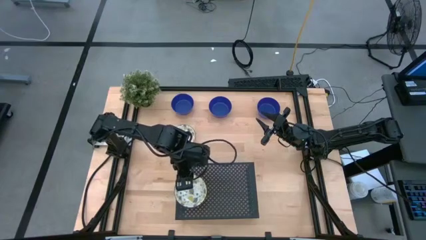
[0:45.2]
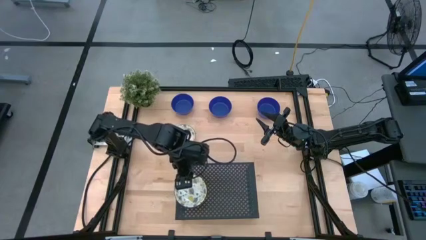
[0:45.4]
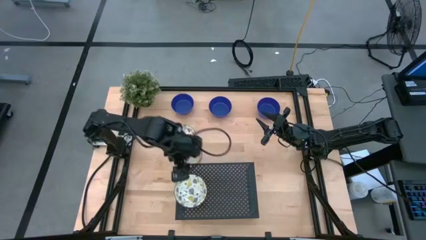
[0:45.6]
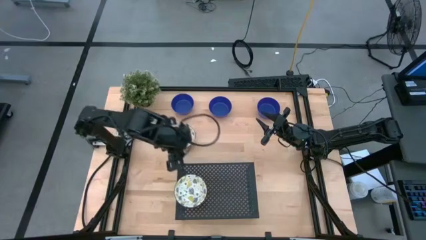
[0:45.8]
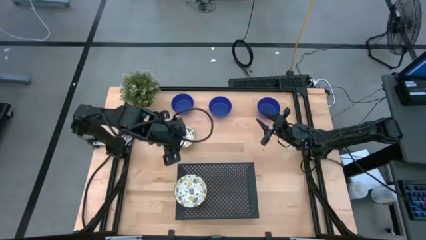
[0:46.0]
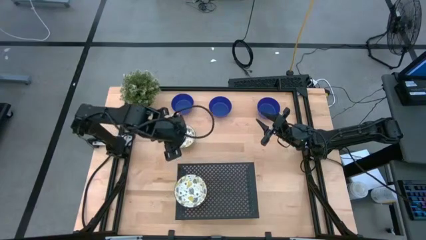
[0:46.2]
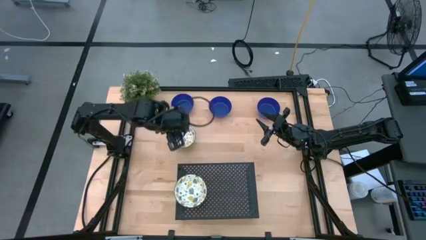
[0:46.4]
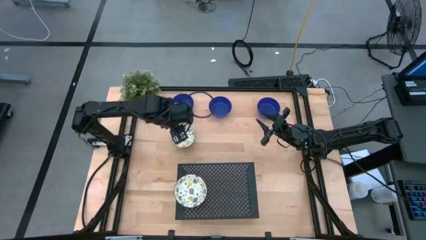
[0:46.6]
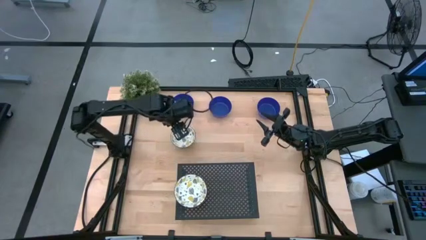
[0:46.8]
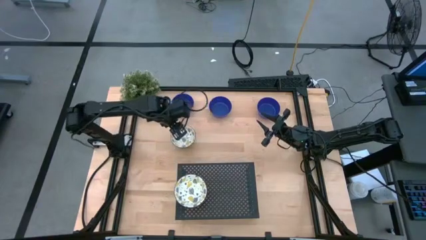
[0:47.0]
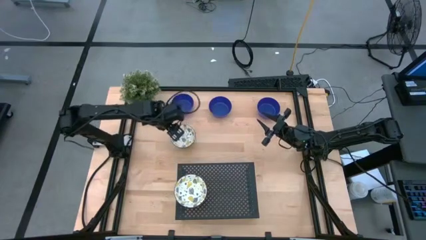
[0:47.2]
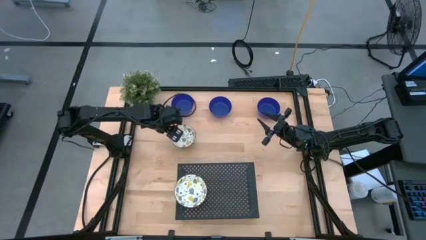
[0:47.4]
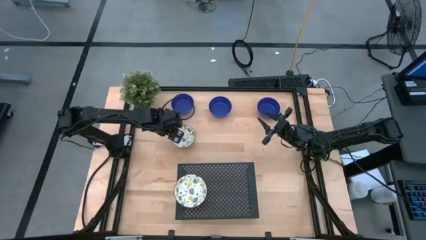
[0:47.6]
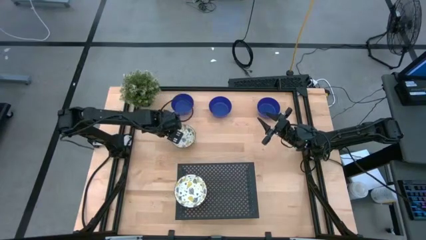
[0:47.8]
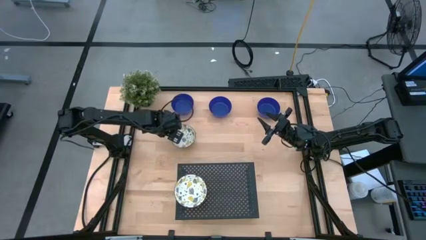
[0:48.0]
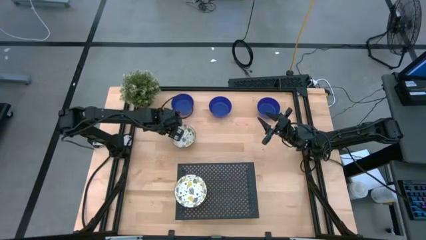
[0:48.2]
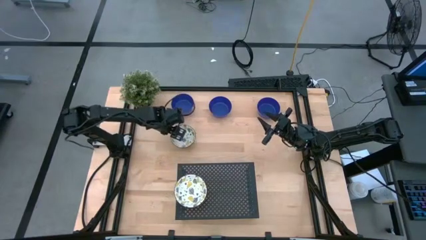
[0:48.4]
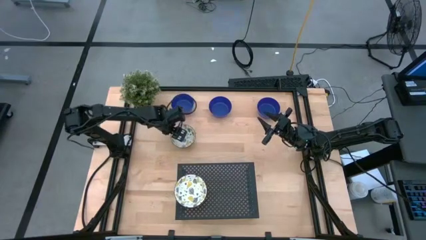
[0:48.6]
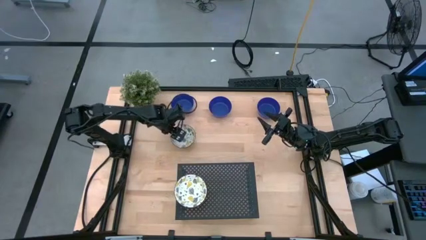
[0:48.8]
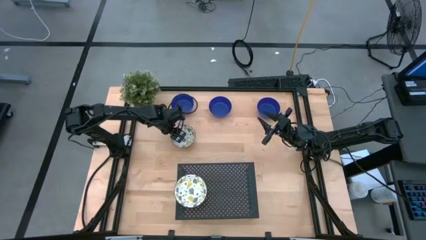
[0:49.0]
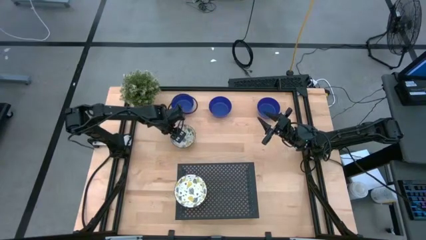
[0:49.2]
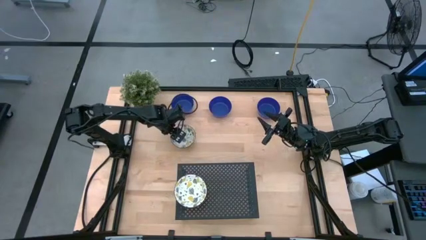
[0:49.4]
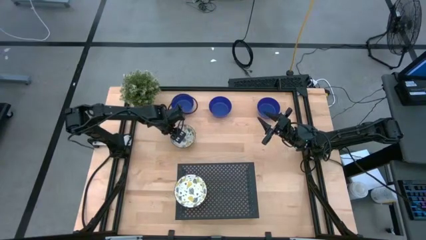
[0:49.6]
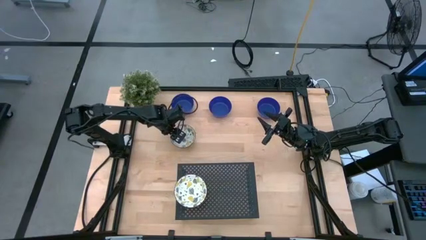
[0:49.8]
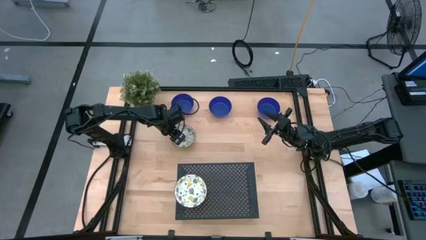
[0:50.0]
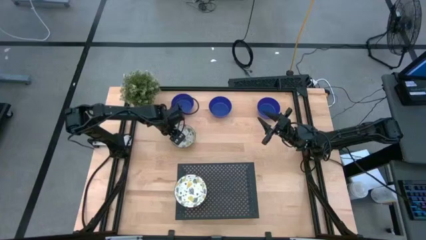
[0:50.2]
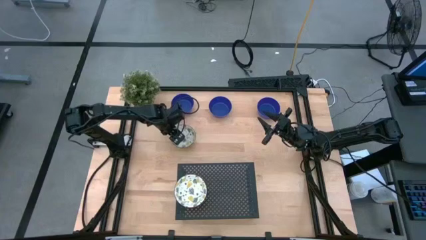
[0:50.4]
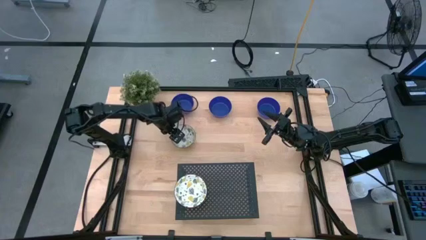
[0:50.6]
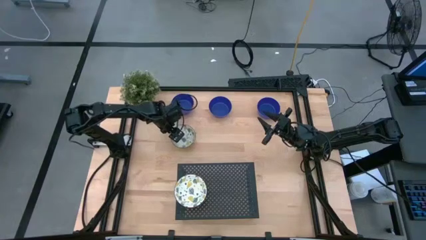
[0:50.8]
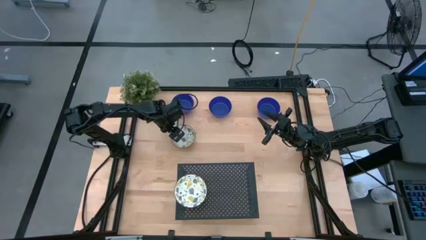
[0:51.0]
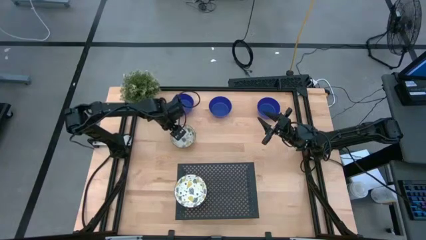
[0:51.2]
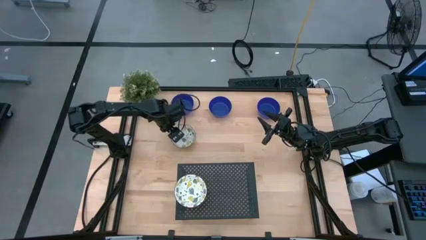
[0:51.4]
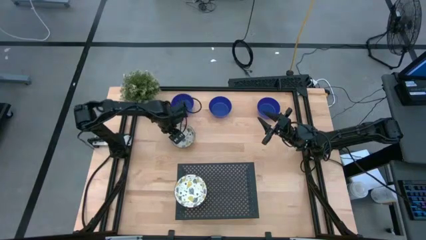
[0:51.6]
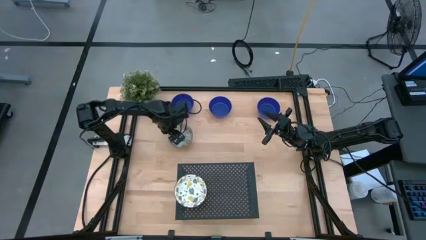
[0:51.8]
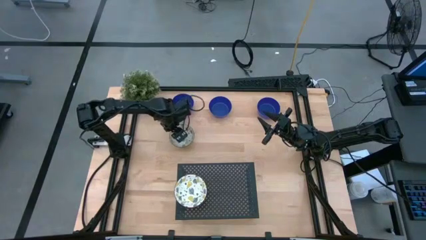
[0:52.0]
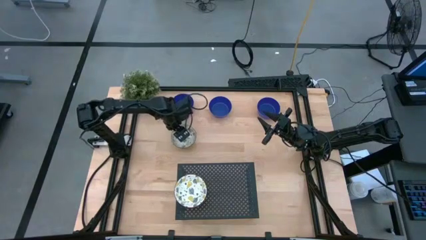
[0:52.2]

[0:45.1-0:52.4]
Task: Pick & Place Mini bowls
Stack the patterned yellow bowl on the patterned yellow bowl on the shelf

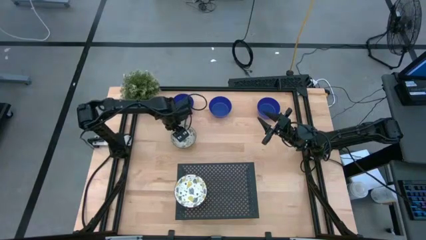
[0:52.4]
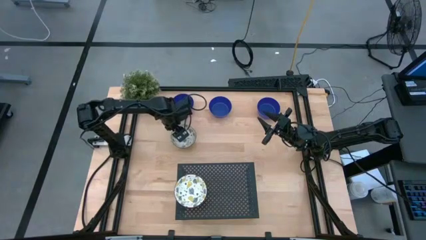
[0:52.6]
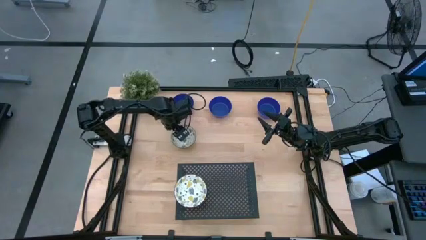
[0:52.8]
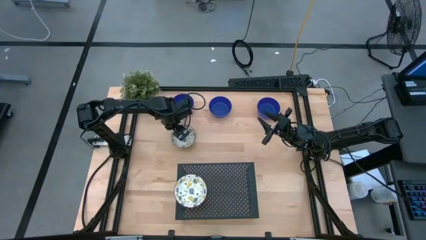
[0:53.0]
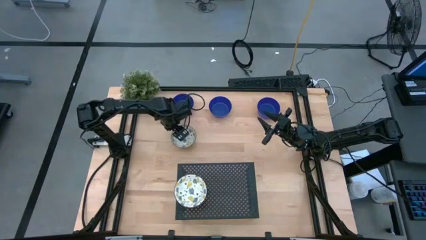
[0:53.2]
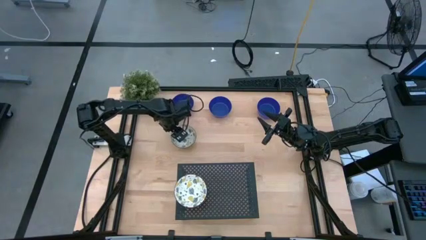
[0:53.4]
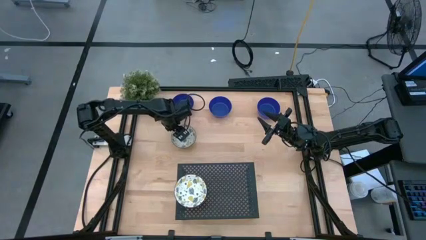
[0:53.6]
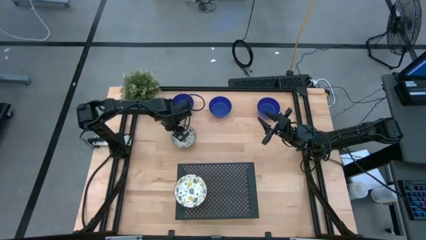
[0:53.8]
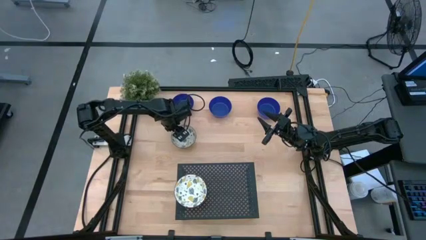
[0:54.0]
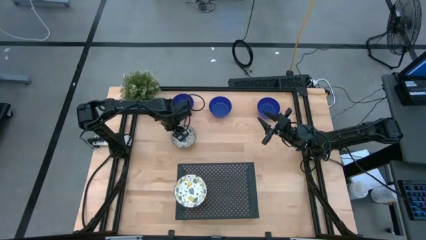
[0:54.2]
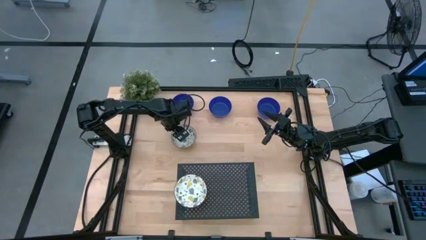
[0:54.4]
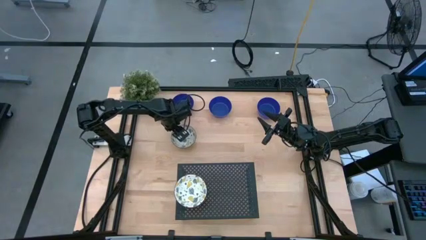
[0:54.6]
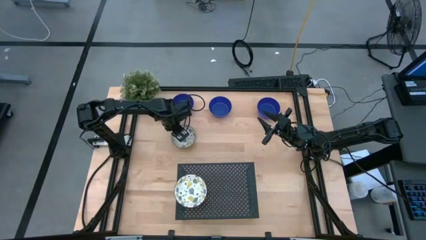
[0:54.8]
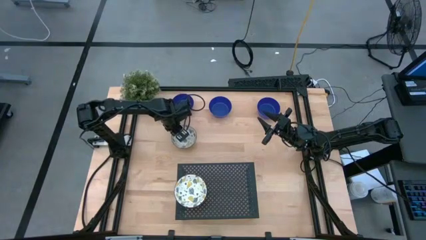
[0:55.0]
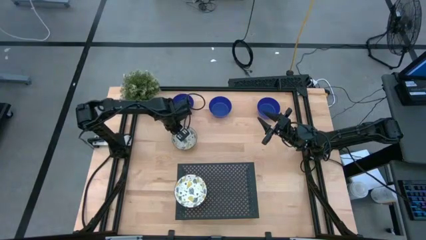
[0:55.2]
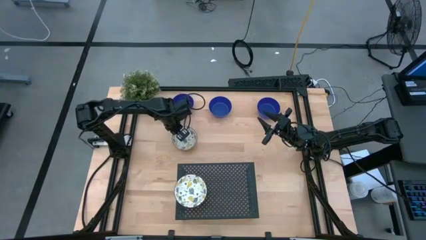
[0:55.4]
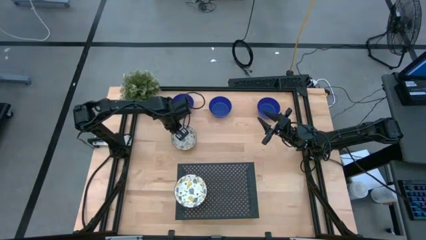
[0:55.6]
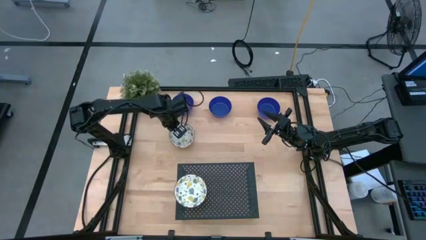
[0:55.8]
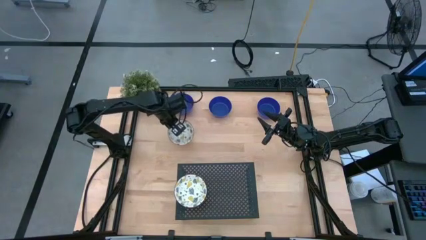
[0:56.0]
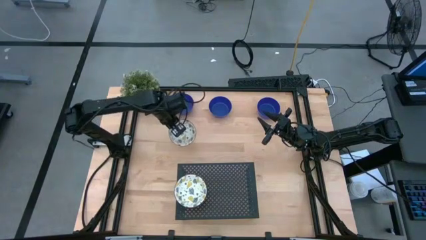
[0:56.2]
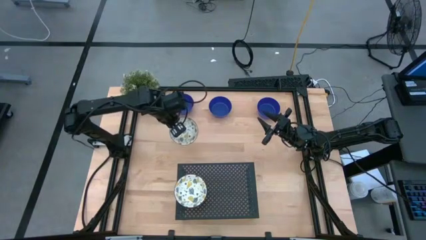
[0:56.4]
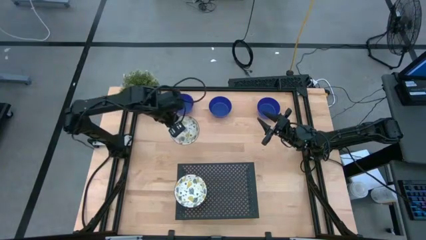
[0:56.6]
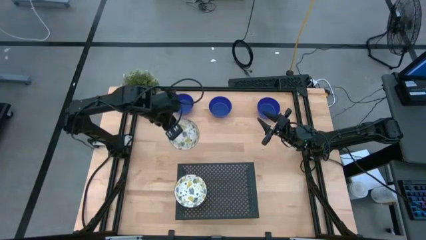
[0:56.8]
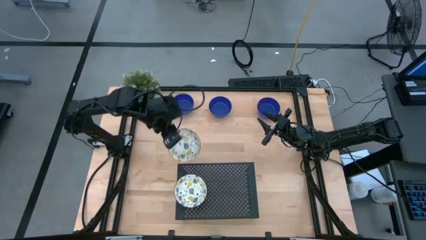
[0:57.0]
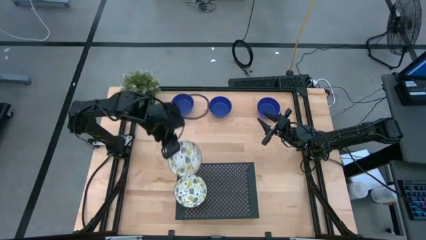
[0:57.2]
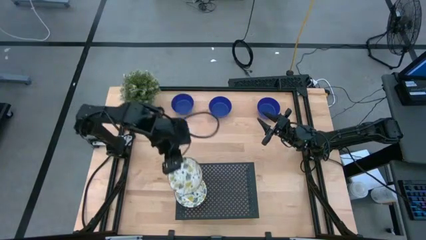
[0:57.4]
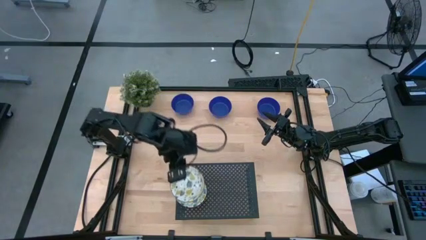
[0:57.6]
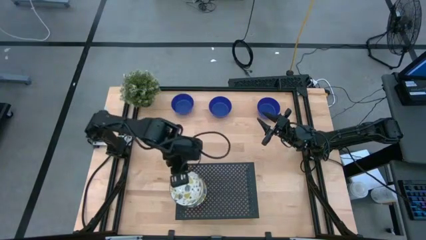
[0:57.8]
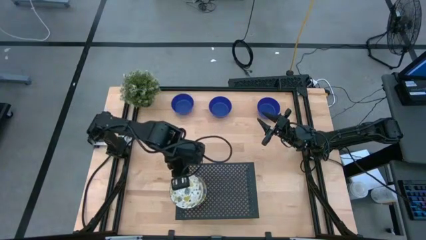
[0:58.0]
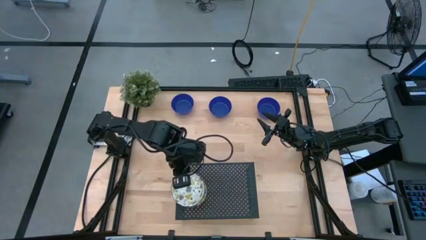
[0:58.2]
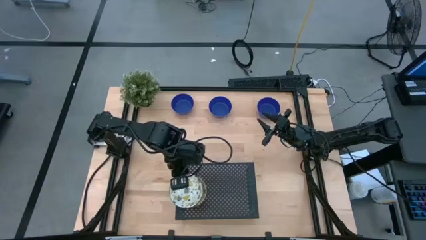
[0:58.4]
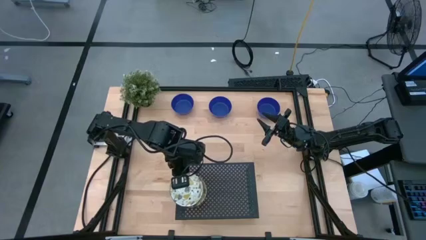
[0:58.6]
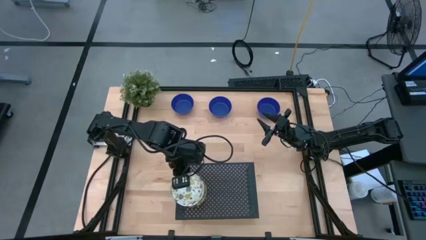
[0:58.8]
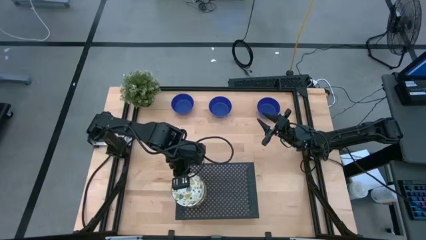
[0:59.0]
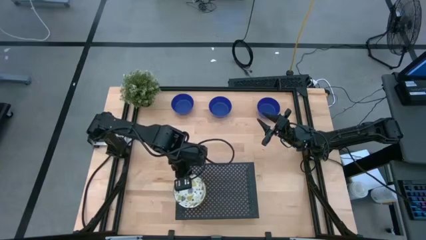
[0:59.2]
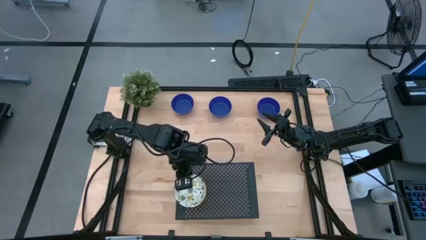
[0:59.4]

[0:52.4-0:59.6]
Stack the patterned yellow bowl on the patterned yellow bowl on the shelf

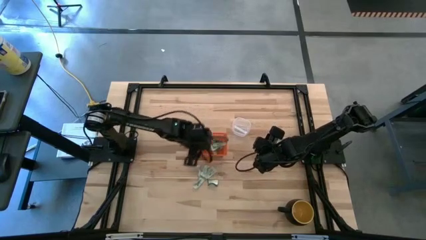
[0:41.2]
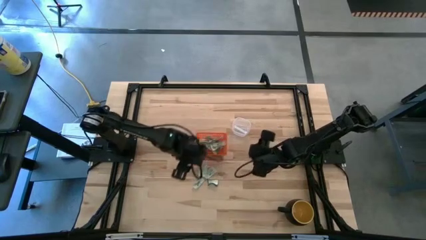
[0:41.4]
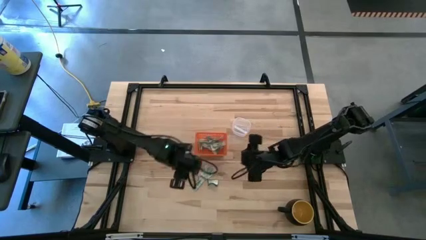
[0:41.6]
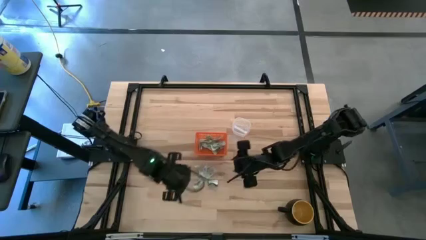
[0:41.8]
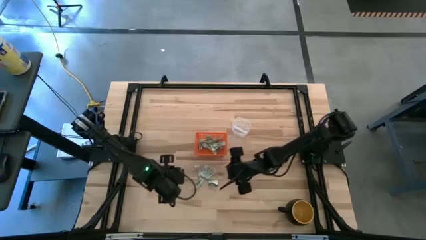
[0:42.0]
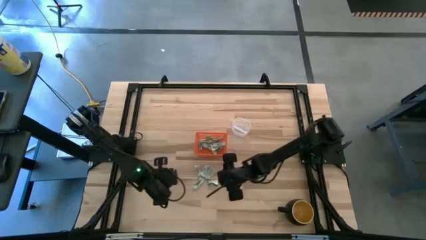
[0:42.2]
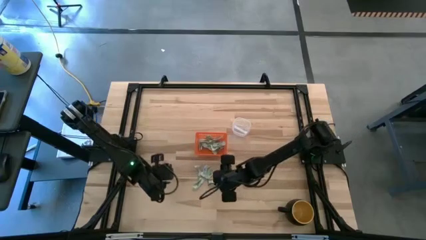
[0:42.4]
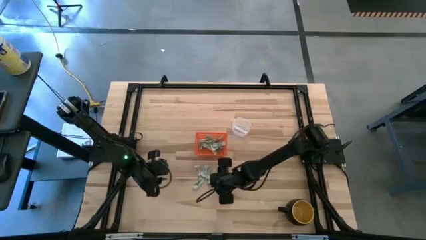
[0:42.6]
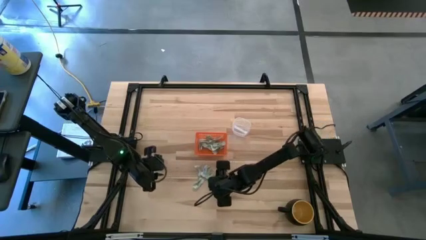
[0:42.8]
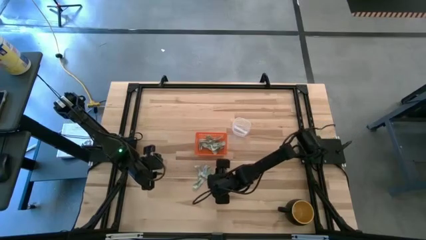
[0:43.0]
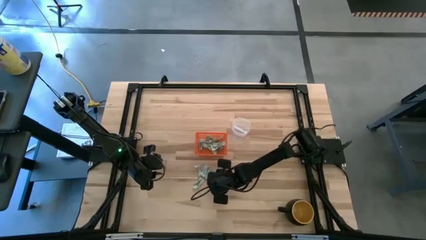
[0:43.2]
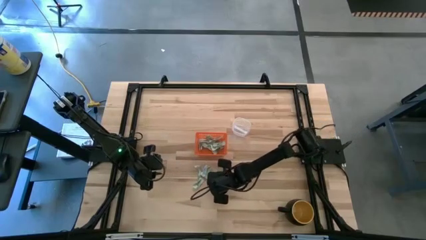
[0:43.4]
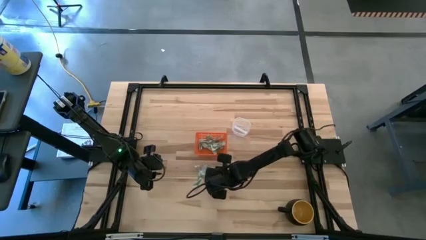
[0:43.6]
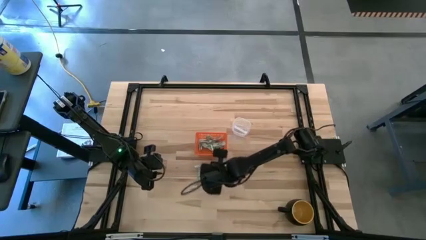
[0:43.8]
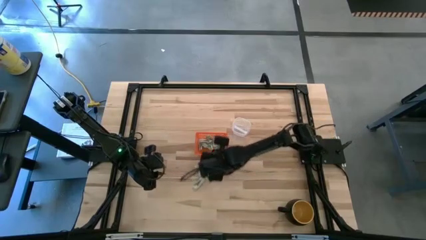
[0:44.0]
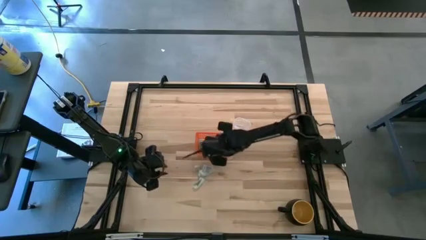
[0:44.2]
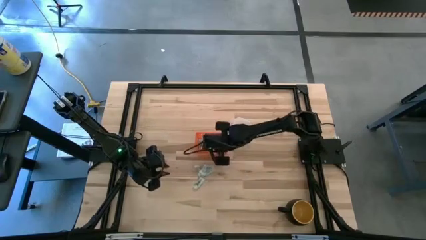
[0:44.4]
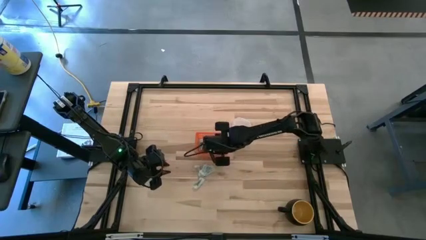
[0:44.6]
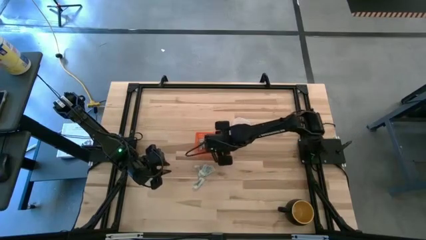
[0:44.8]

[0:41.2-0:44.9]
Task: Pick and place Stevia / Truvia into bins
Put the truvia packet into the basket
